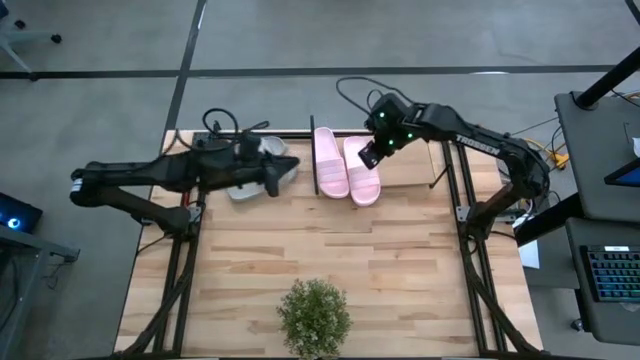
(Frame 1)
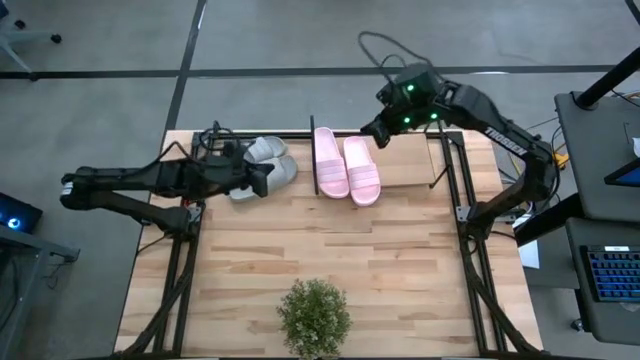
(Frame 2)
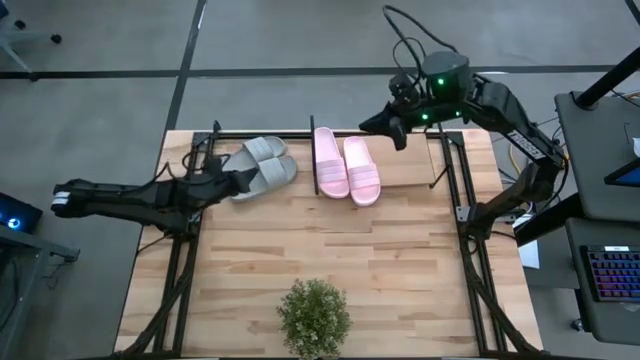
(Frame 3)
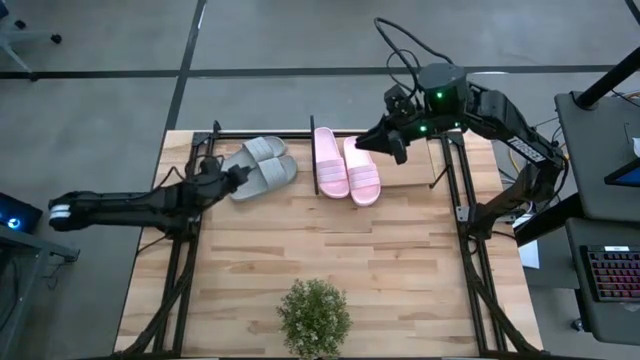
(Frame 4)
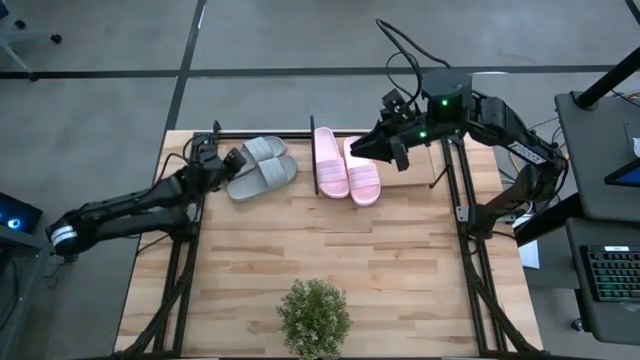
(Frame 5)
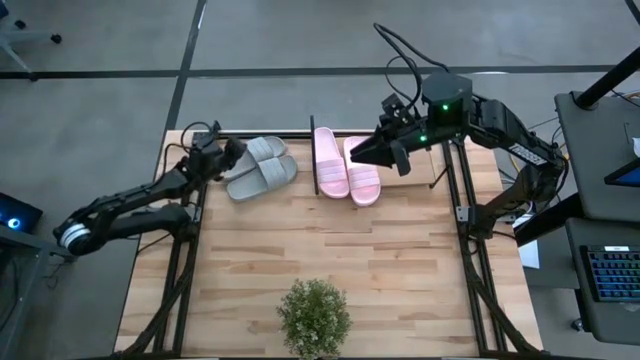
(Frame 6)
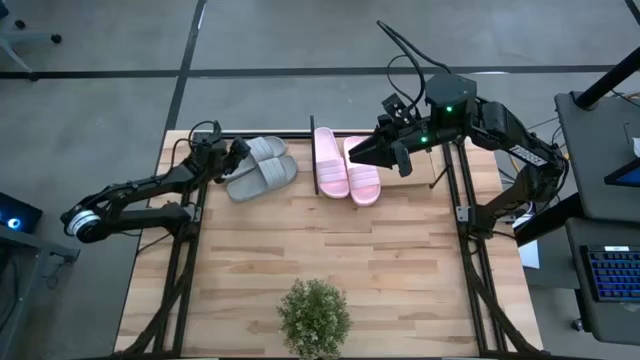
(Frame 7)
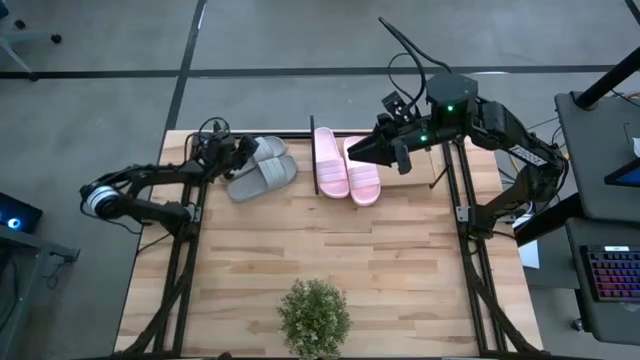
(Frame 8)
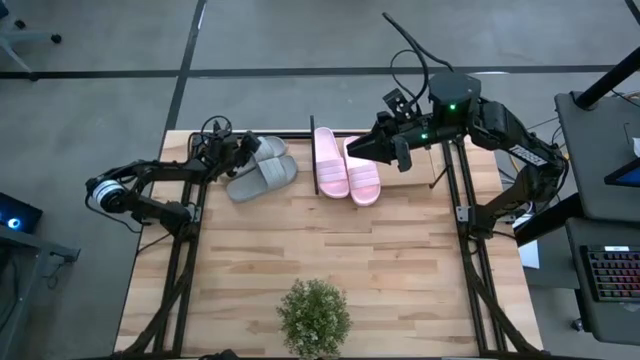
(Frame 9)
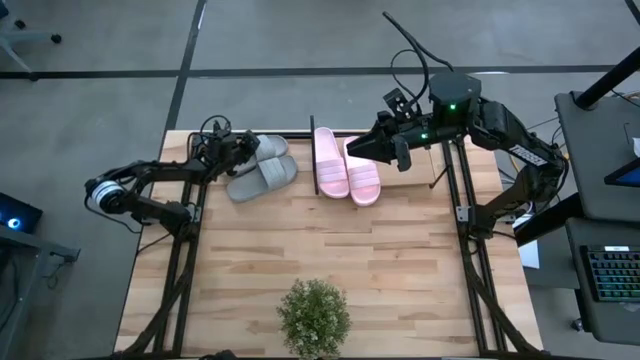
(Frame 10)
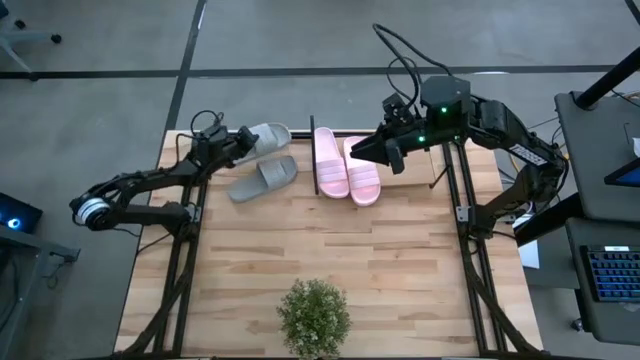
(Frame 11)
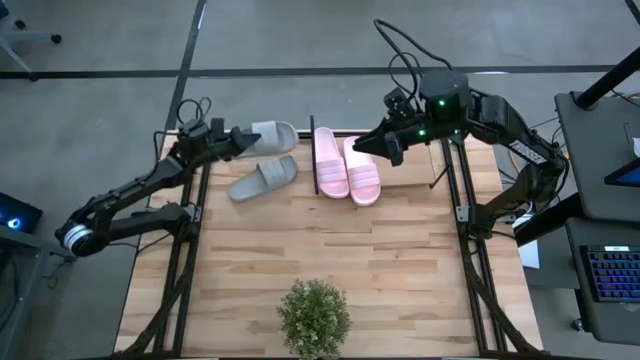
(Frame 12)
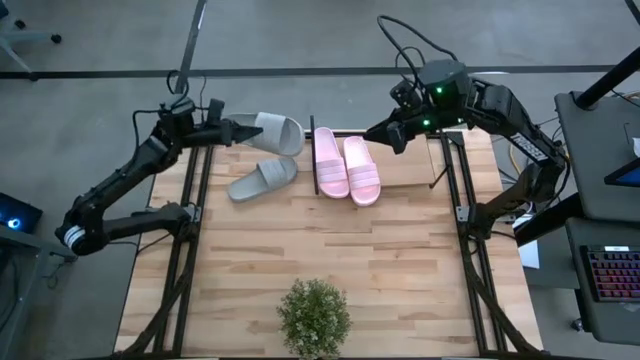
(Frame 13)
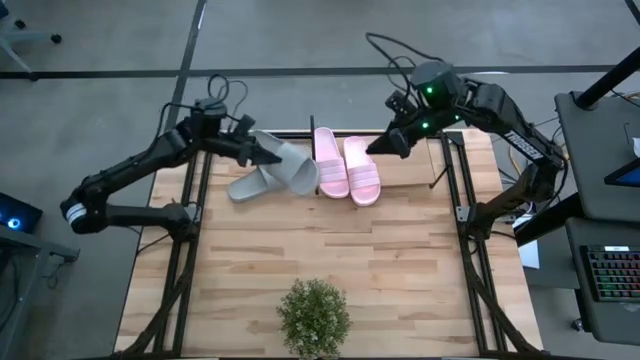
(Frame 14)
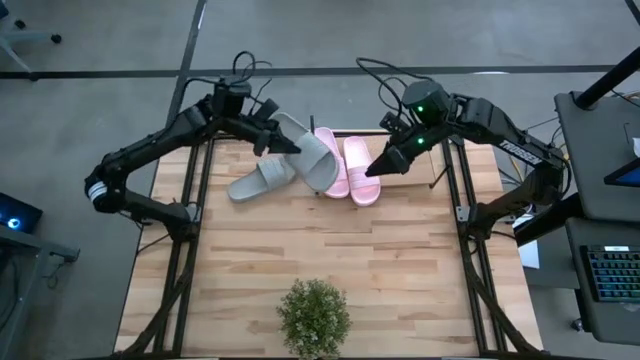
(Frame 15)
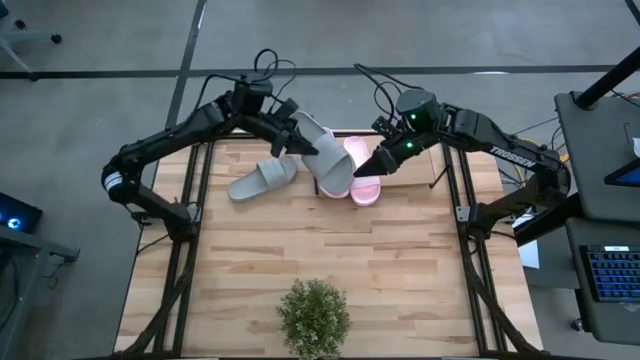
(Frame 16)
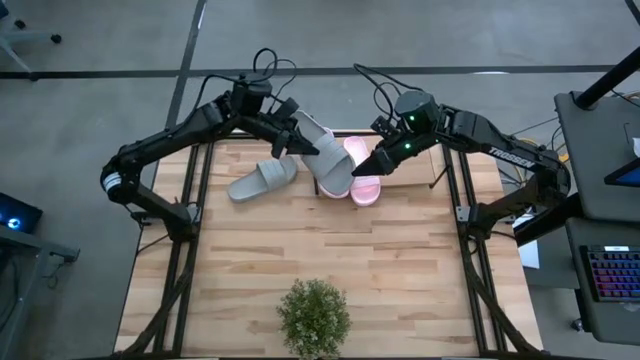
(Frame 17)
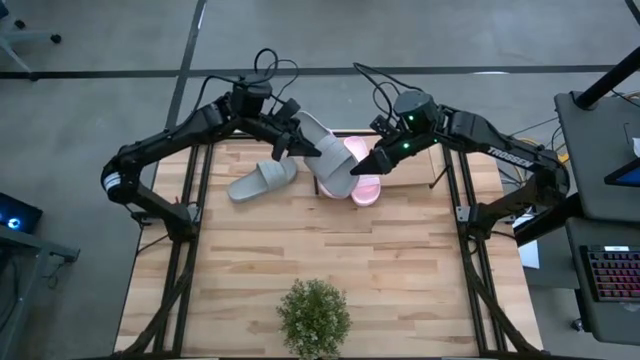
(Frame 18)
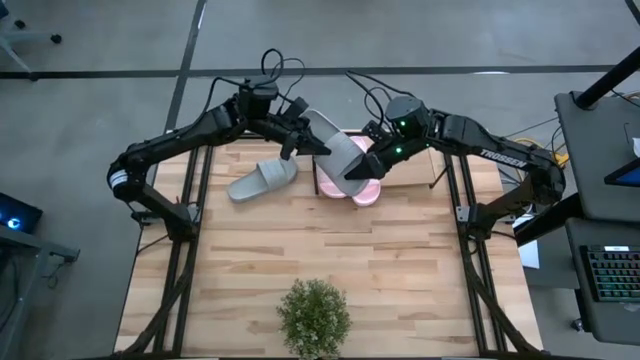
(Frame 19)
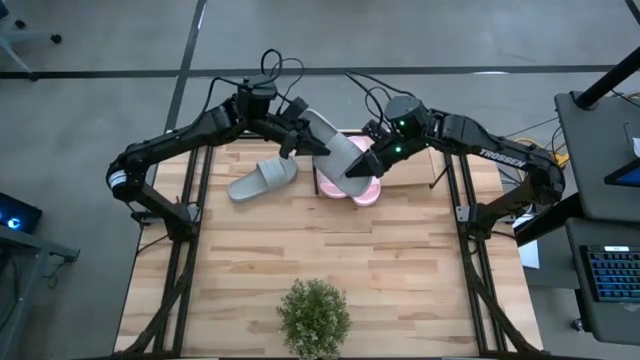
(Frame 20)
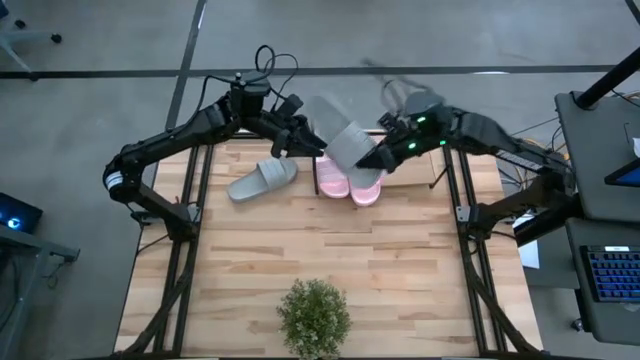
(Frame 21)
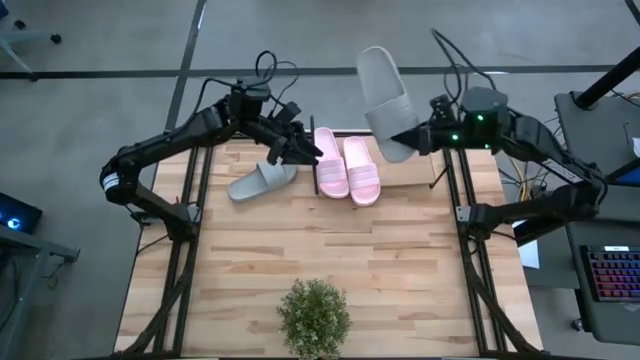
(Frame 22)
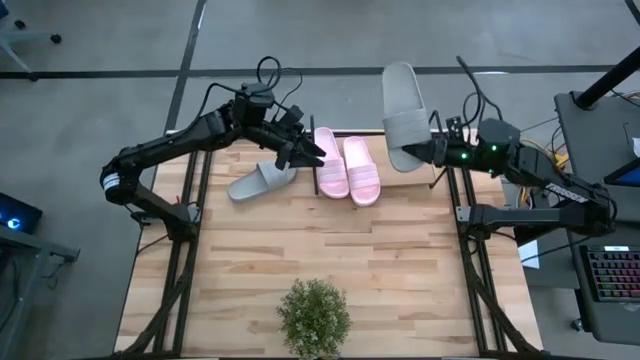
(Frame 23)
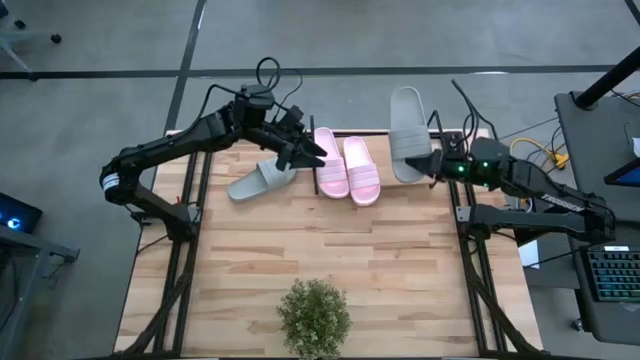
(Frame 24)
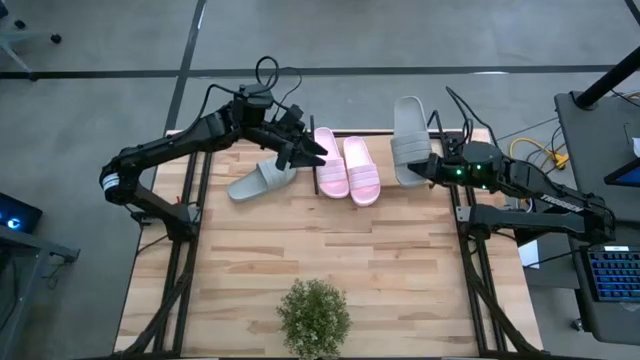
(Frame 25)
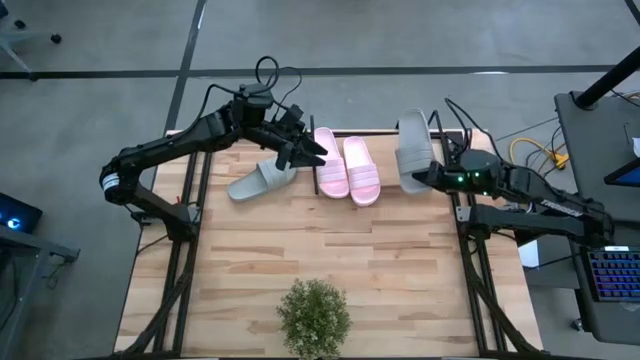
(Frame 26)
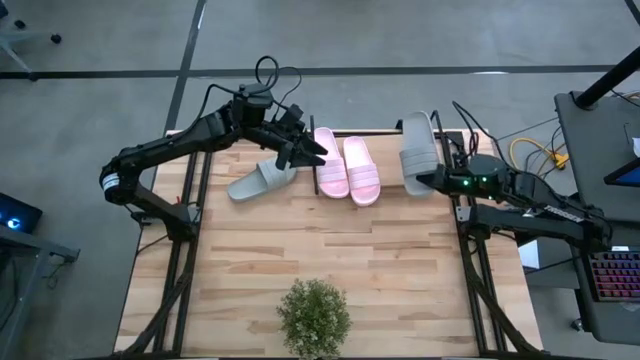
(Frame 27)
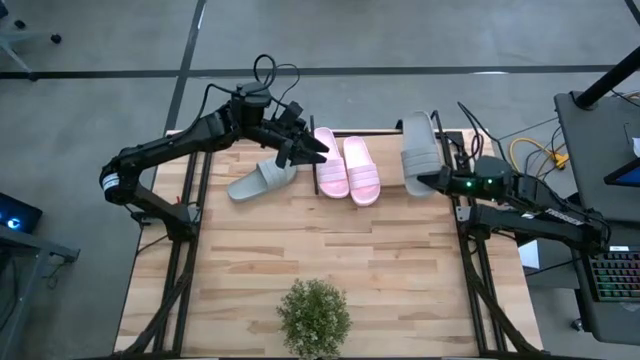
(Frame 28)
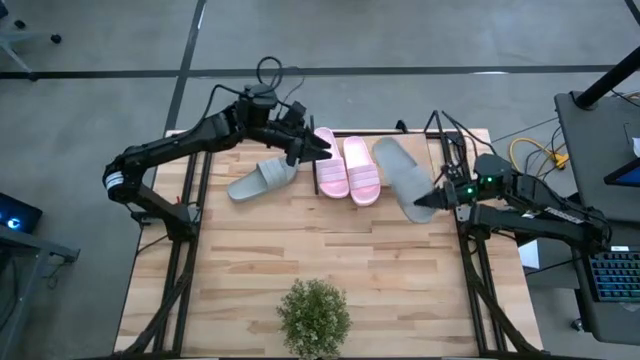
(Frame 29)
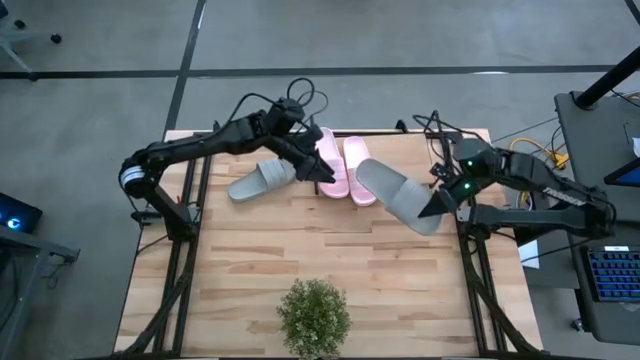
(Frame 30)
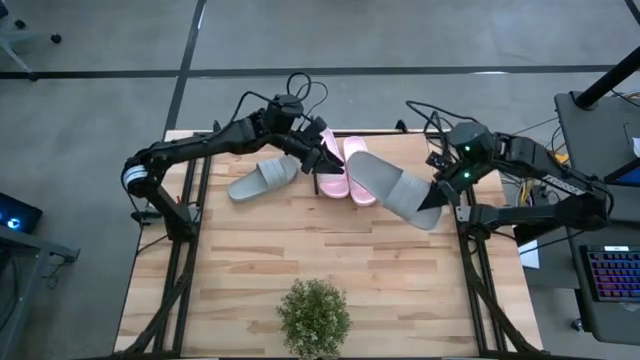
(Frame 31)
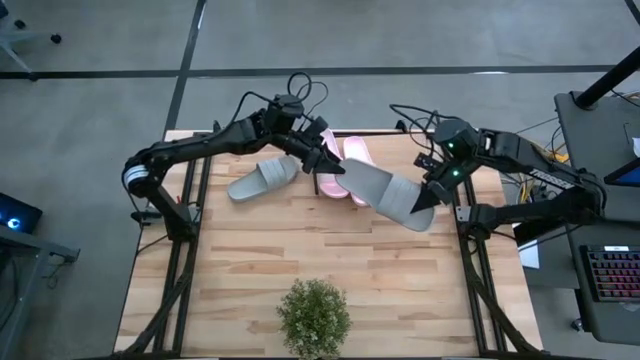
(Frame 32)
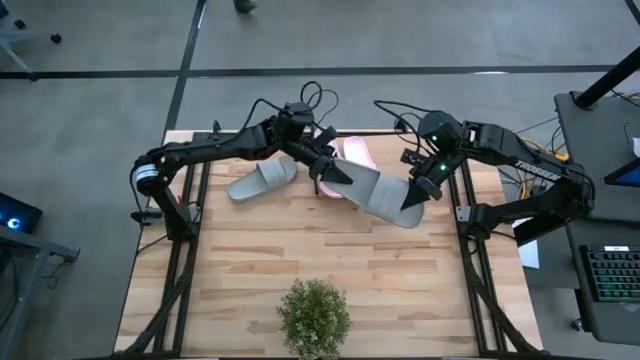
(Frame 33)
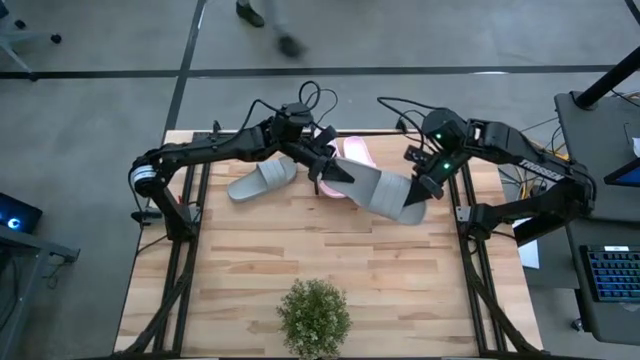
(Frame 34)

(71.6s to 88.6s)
Task: Pick and place slides into the shelf
Put the top gray slipper on the shelf

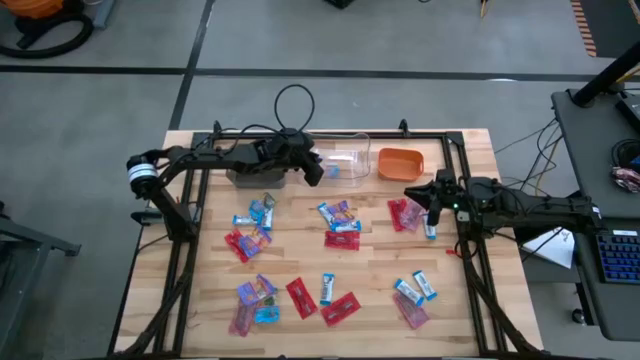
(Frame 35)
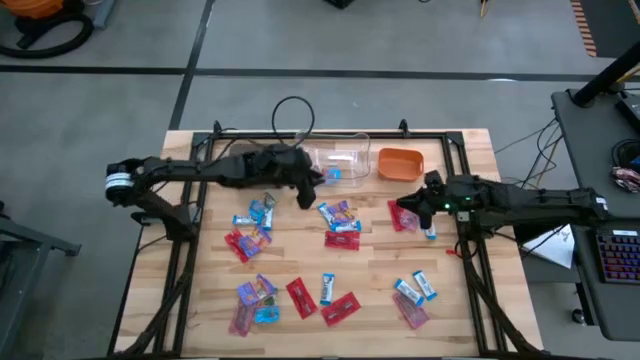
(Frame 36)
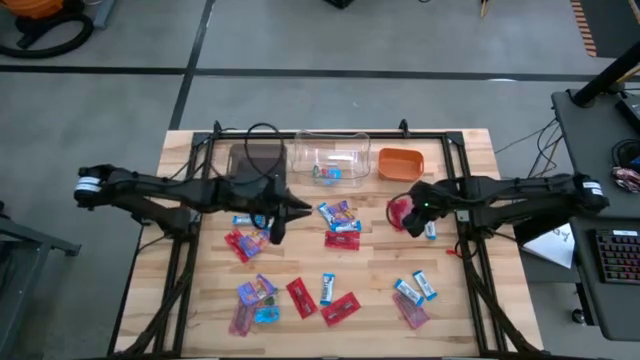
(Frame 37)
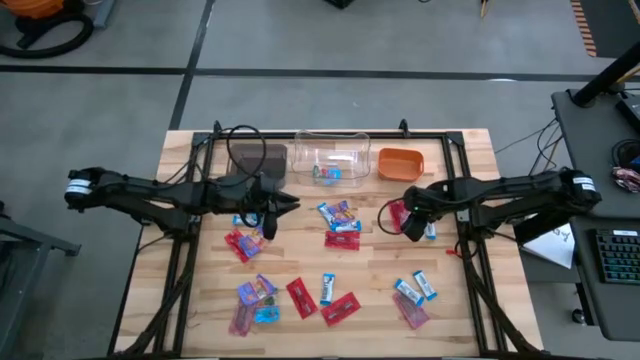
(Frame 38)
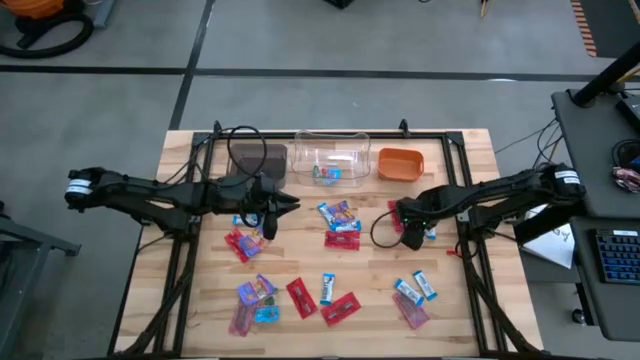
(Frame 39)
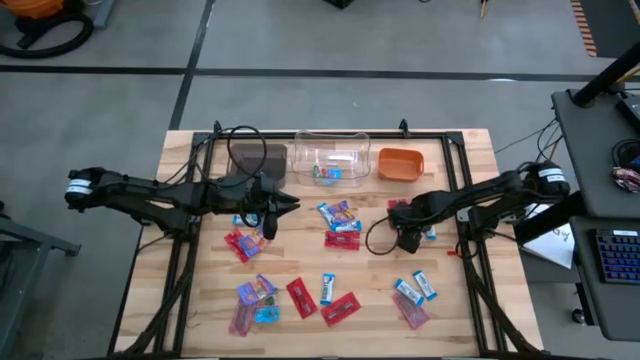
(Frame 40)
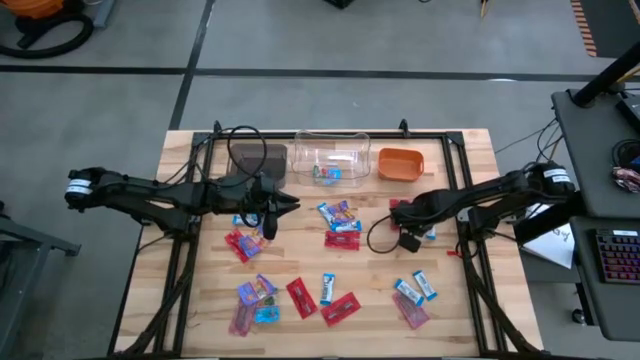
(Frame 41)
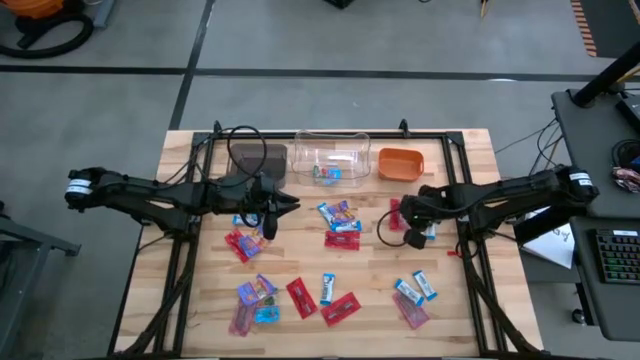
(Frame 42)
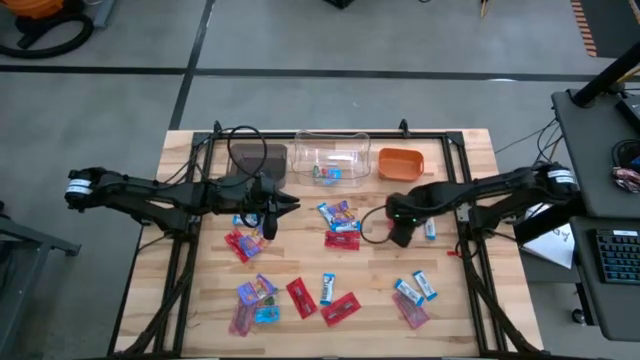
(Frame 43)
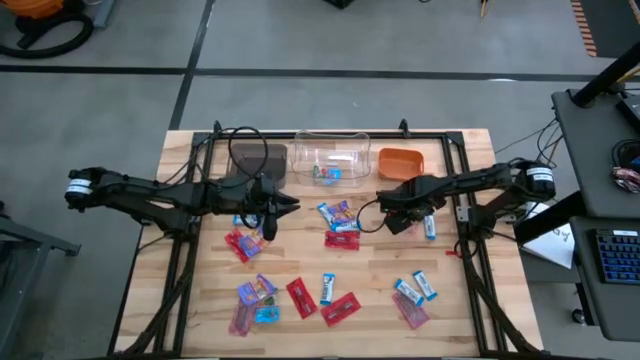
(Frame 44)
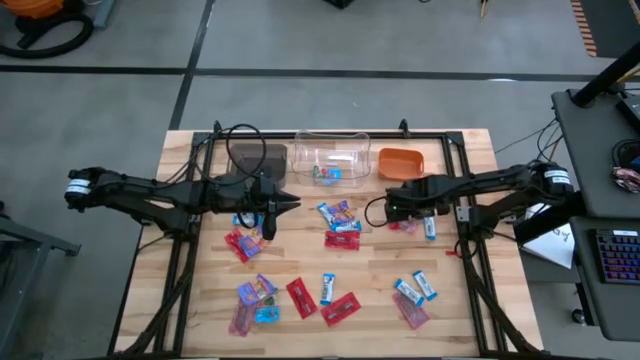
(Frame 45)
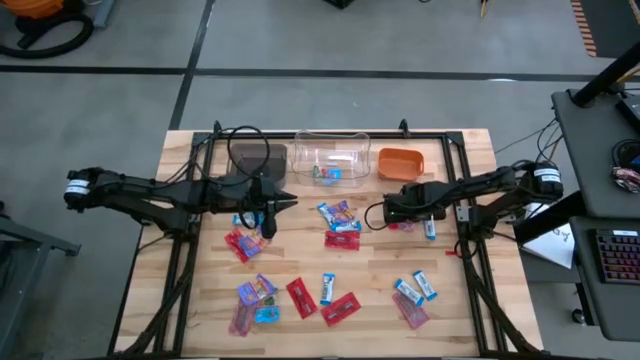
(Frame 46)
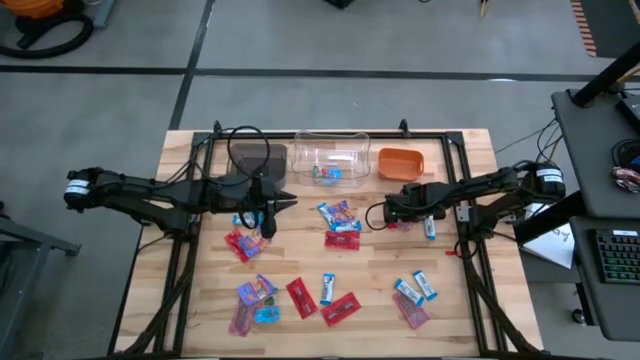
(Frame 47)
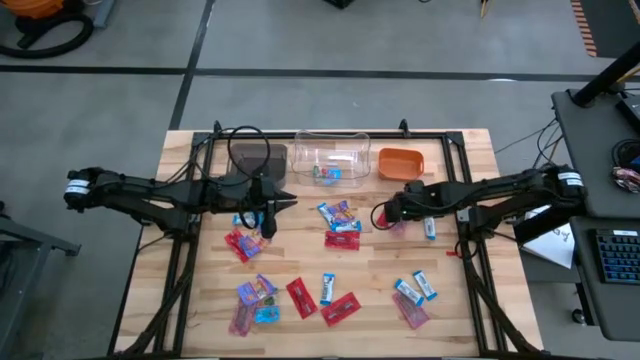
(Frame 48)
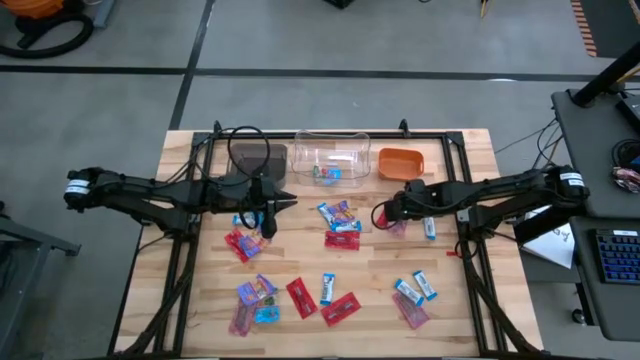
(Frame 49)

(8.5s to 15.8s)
Task: Sort candy
Put the red candy into the orange bin
